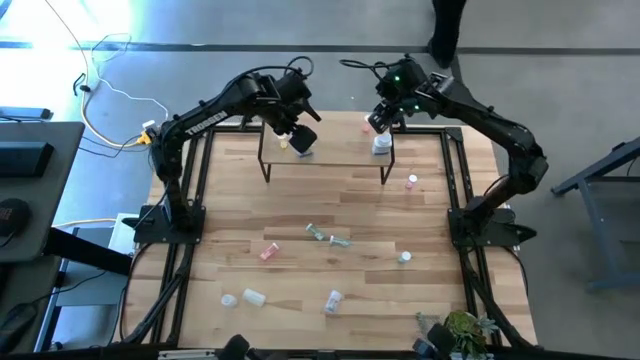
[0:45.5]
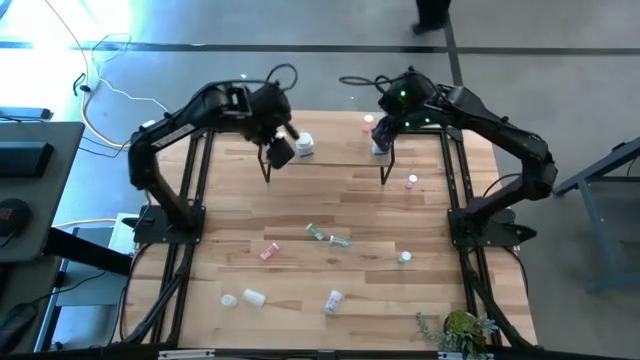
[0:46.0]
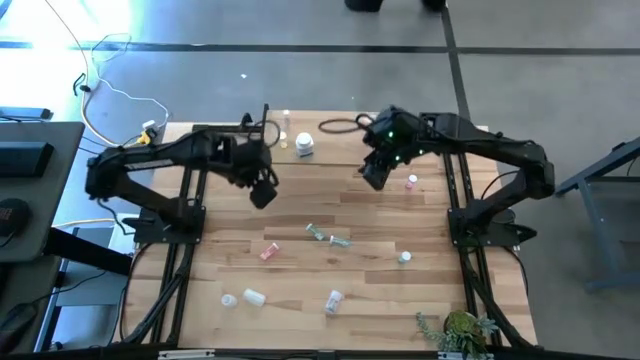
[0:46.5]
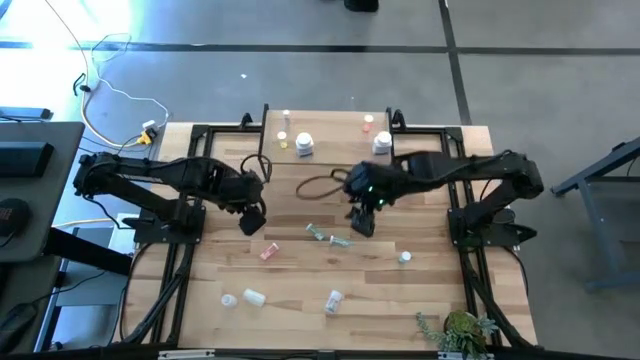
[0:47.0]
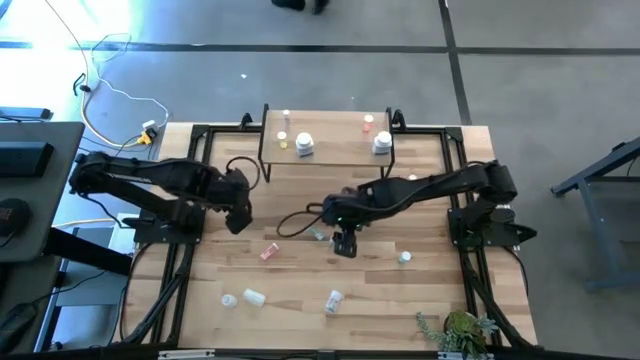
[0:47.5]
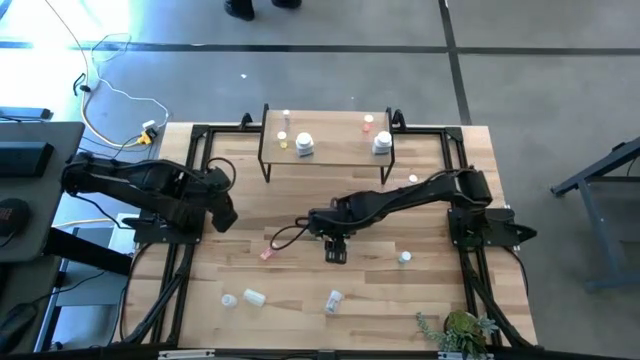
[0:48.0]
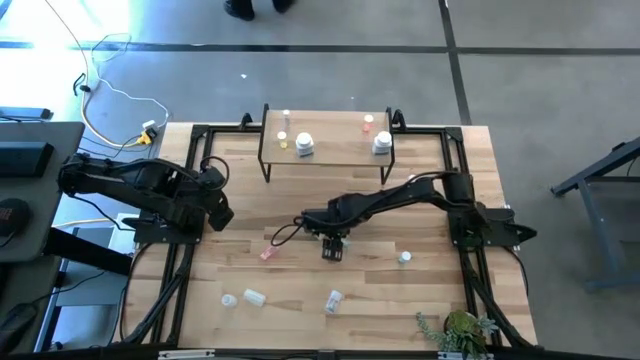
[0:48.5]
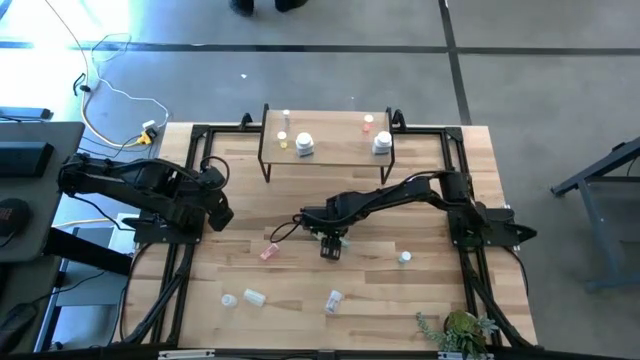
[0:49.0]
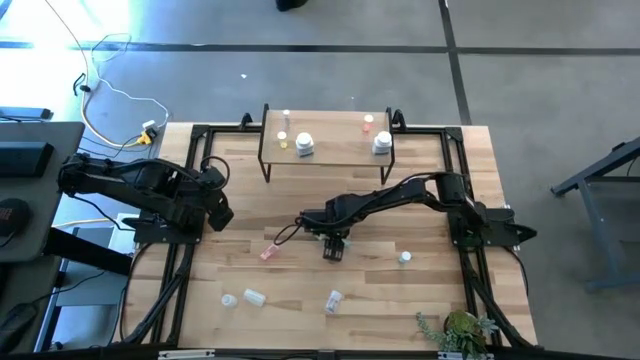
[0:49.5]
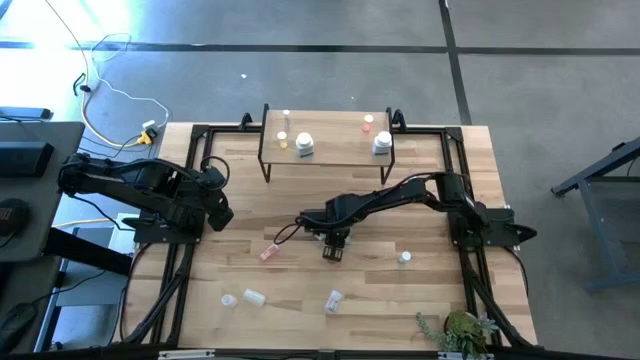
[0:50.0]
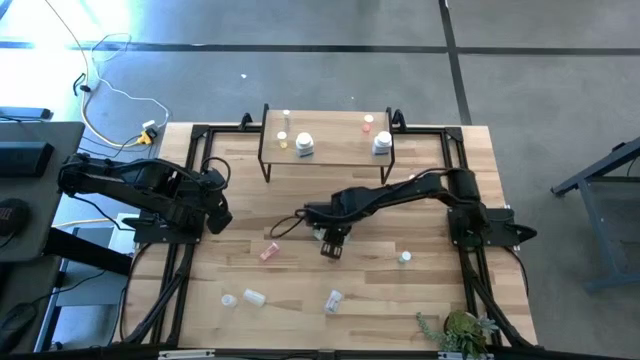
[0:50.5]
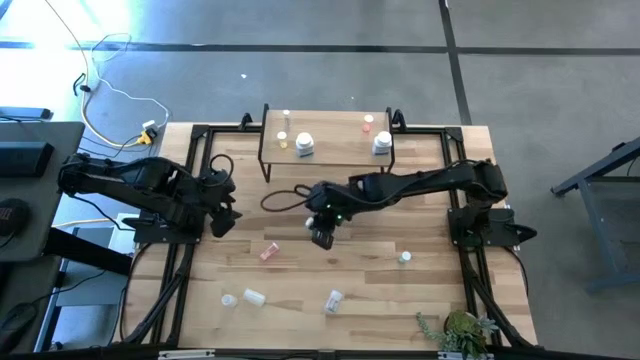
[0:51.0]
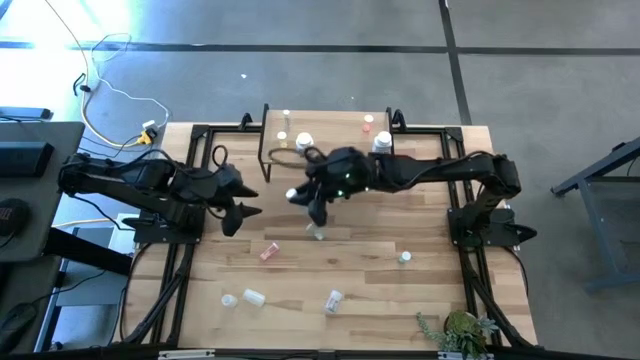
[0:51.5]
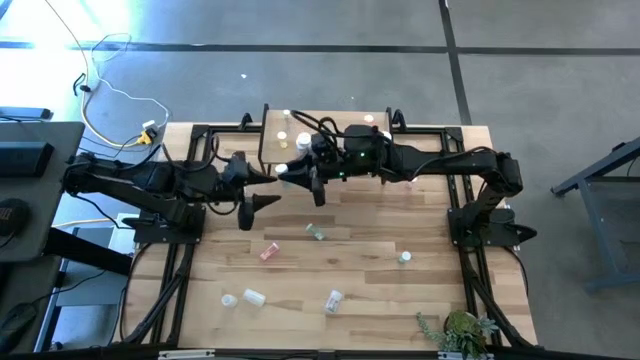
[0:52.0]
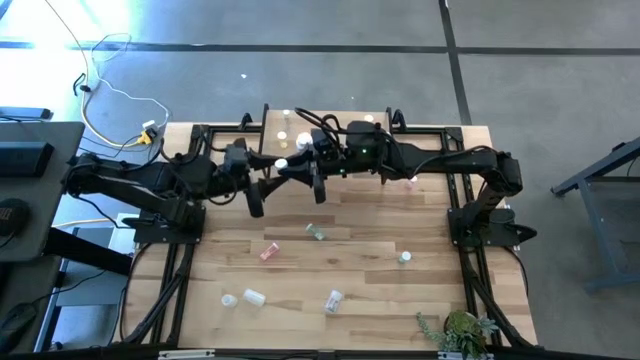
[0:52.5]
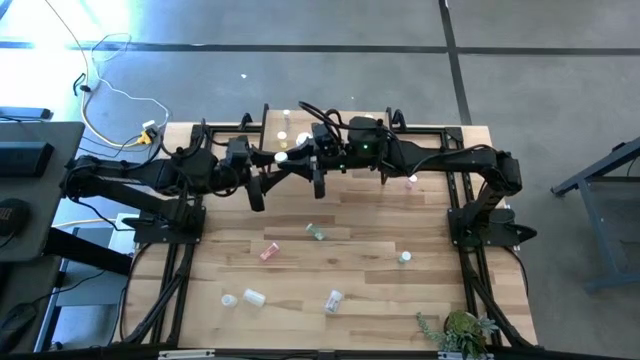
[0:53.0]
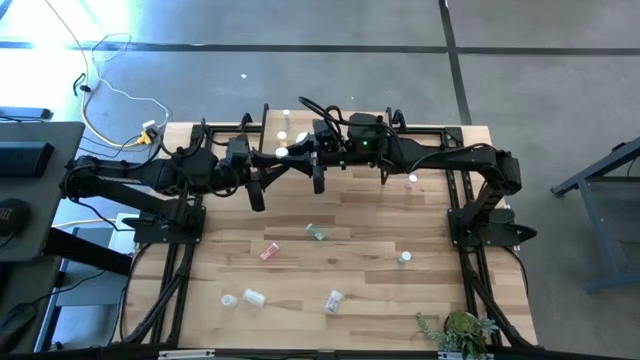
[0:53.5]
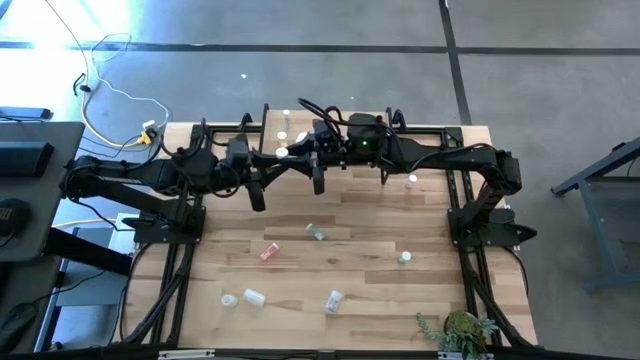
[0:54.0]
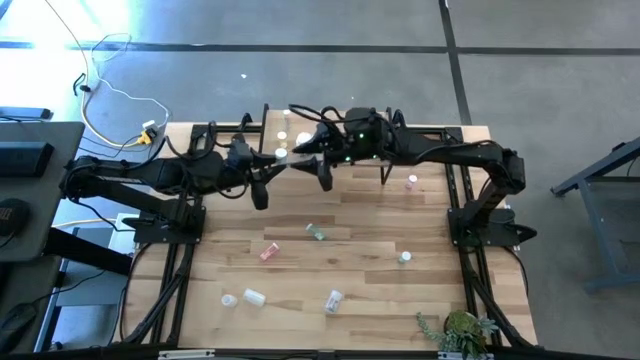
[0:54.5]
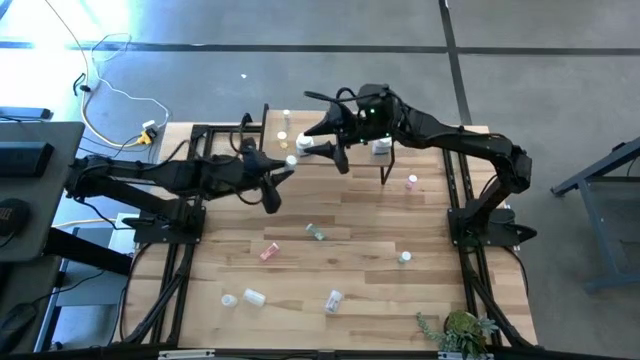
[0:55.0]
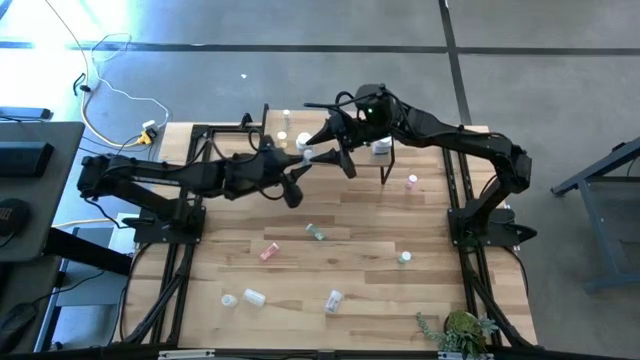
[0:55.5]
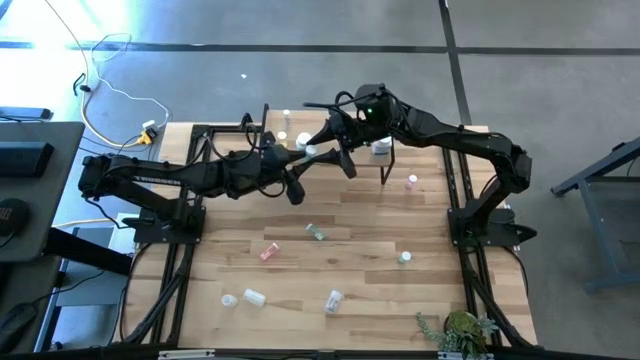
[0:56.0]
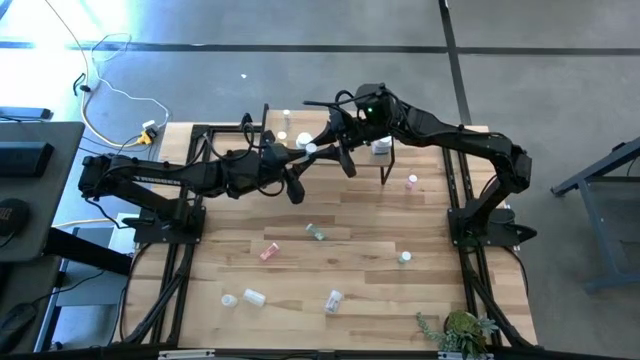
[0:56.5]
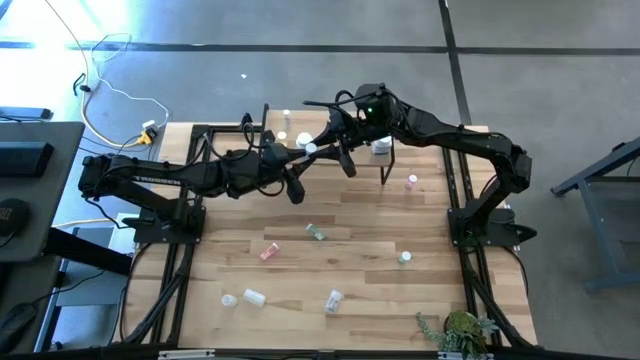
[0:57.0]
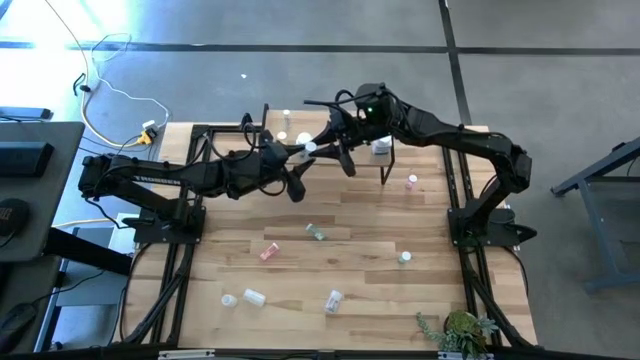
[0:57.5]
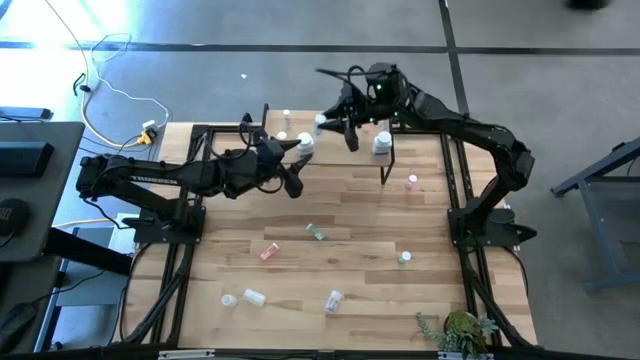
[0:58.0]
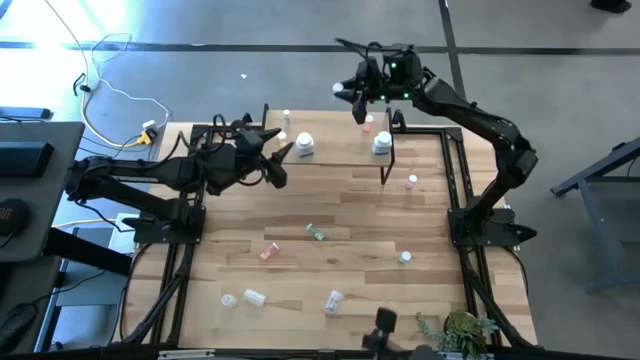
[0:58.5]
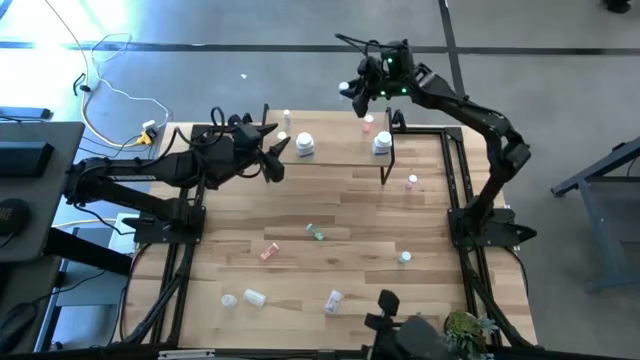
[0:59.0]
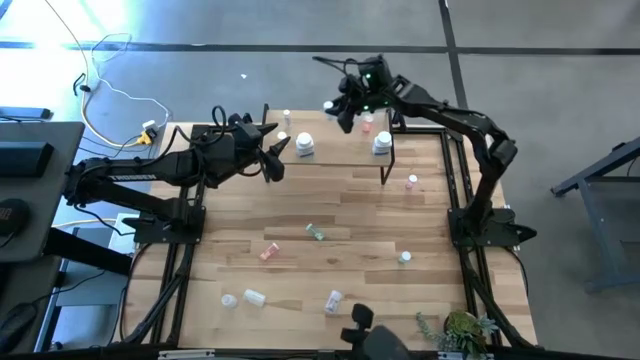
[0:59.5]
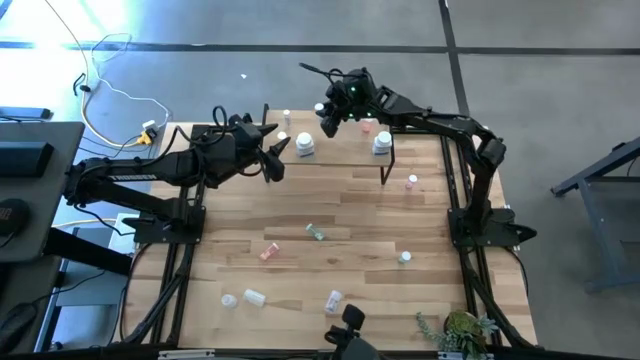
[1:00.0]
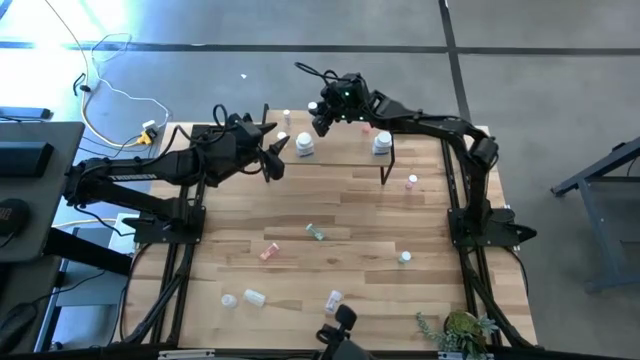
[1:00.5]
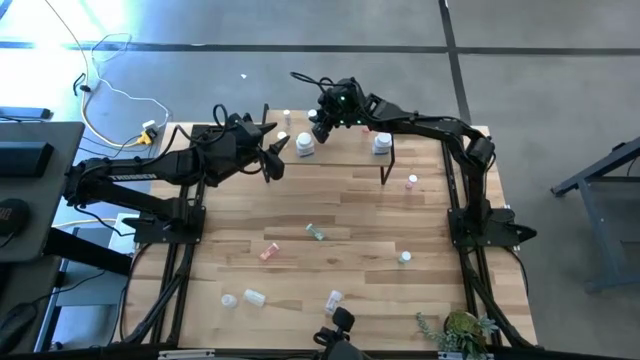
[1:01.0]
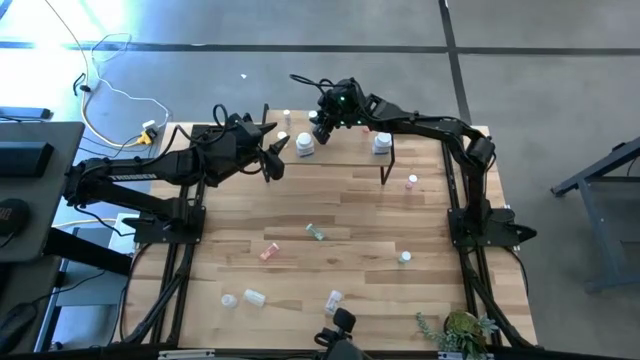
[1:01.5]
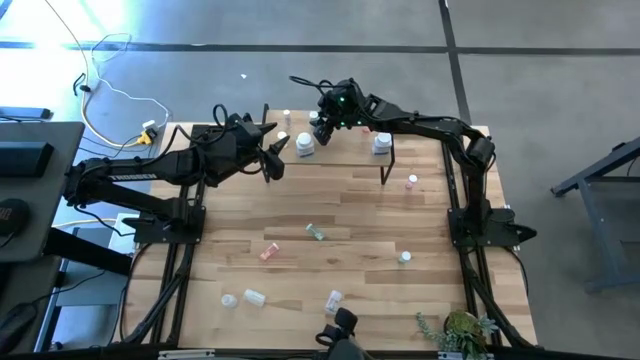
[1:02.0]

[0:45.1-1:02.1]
Task: Pick and place medicine bottles onto shelf by color
Put the middle blue pill bottle on the shelf

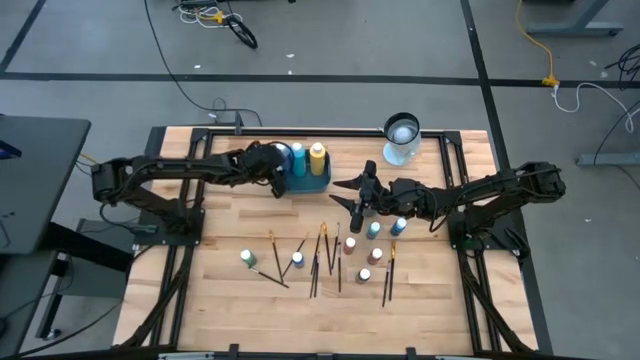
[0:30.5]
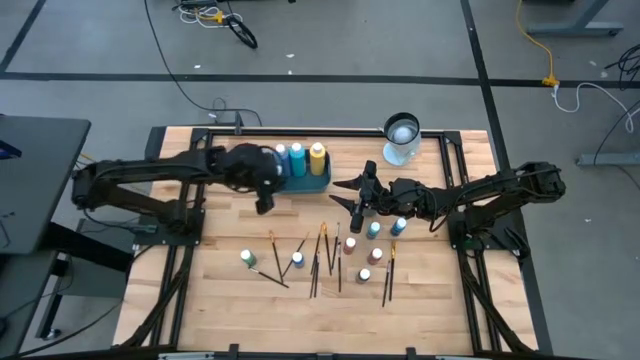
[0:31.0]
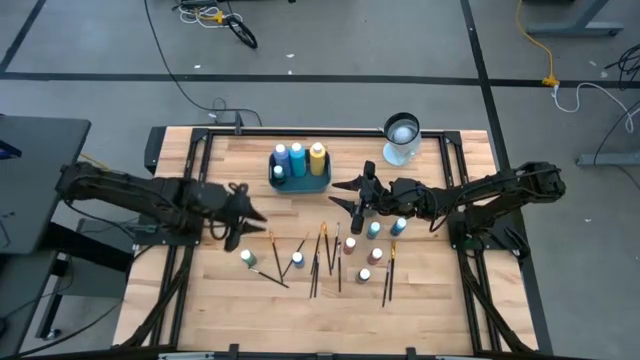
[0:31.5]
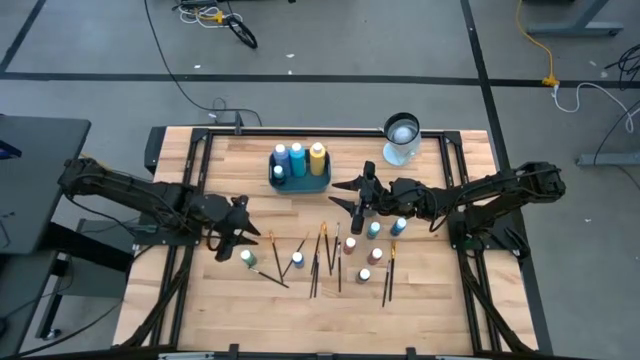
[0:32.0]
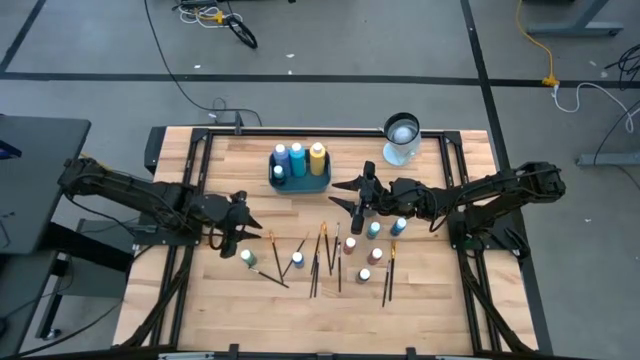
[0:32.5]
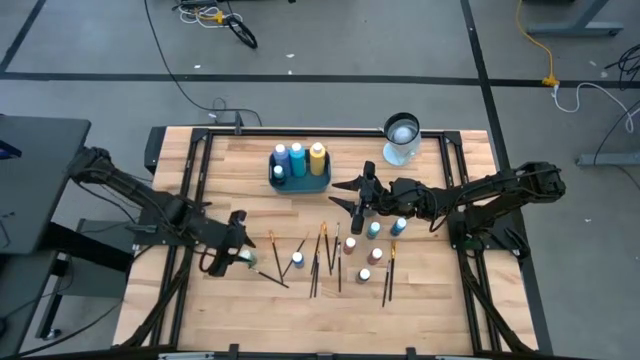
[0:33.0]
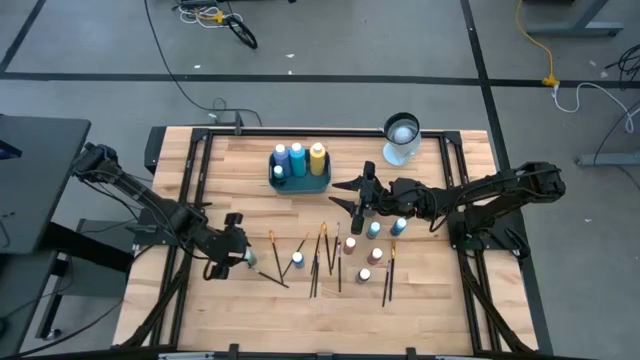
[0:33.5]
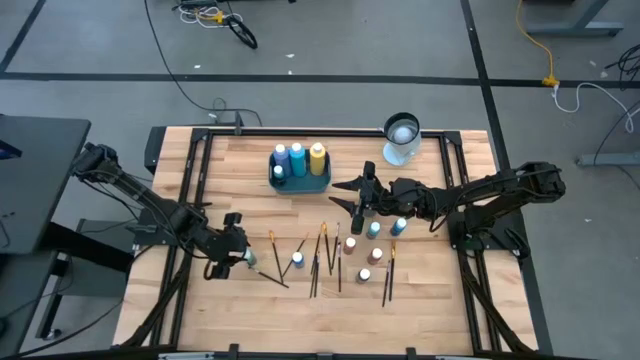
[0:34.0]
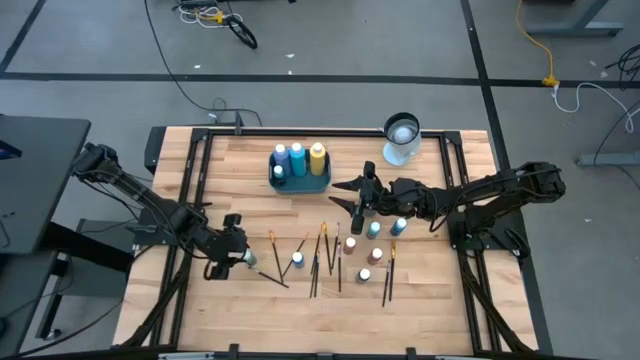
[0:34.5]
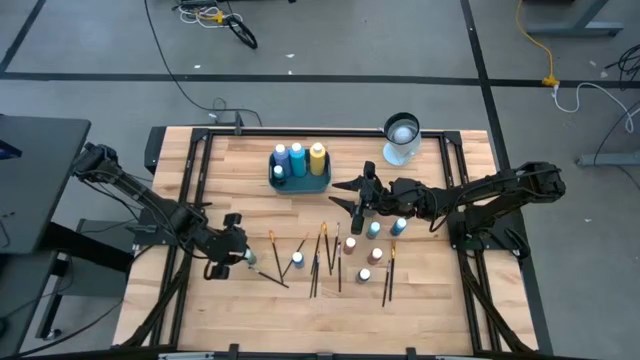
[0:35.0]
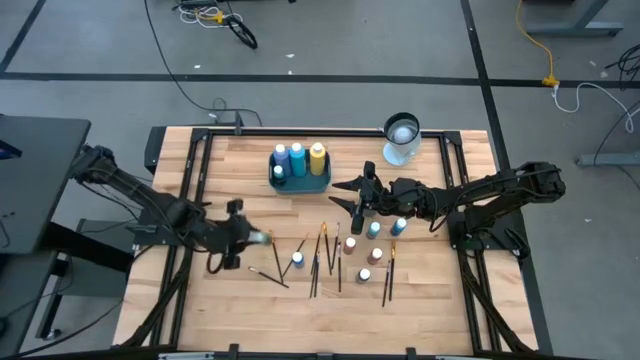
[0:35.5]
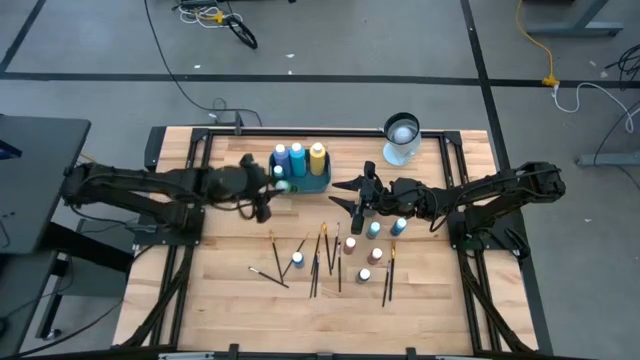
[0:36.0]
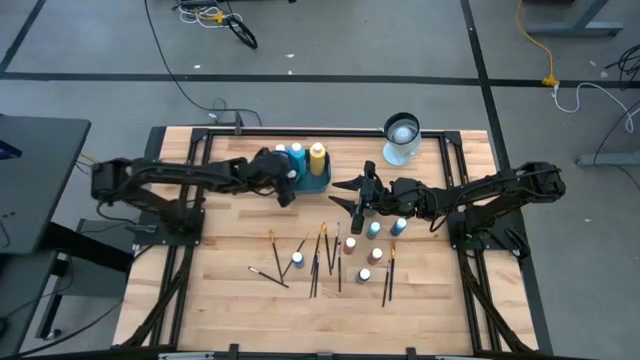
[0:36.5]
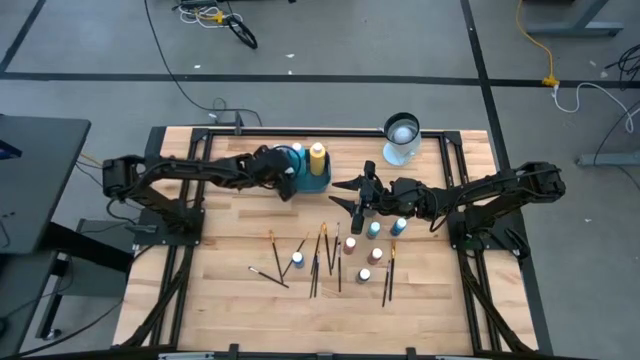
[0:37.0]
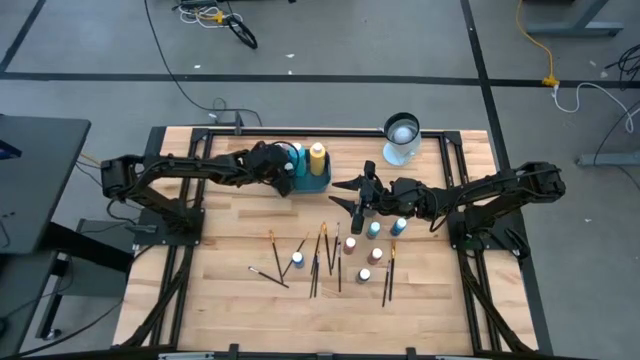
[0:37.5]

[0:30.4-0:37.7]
Task: Pick & Place Paint Supplies
Put the green paint bottle into the blue bin
